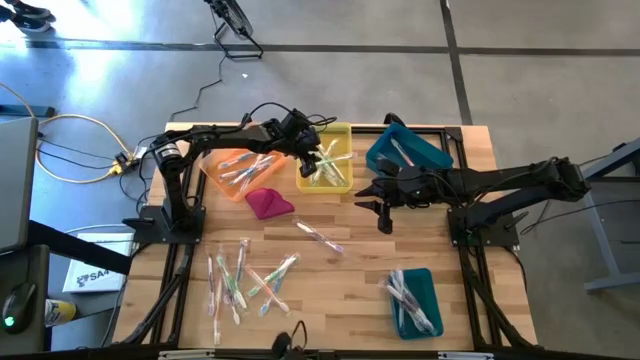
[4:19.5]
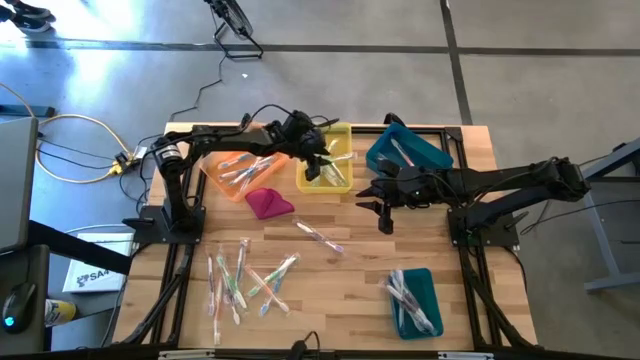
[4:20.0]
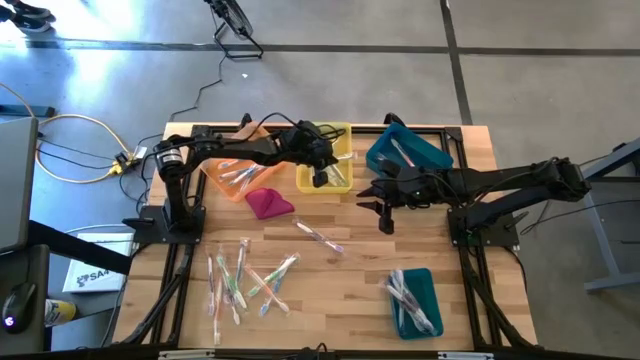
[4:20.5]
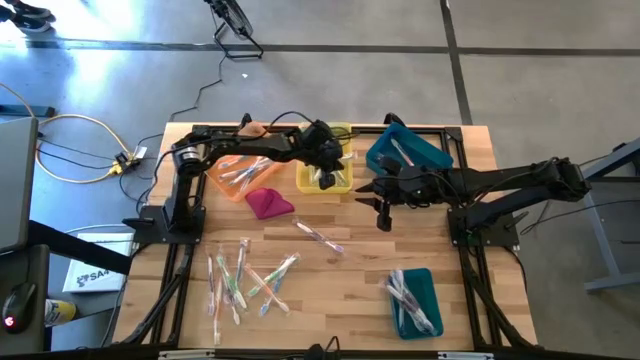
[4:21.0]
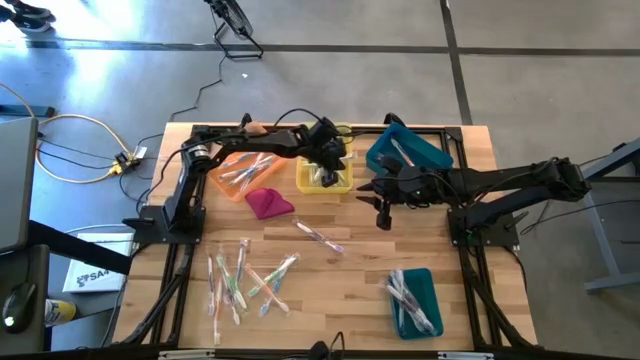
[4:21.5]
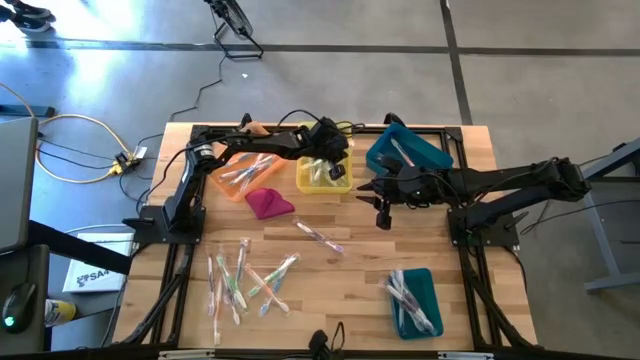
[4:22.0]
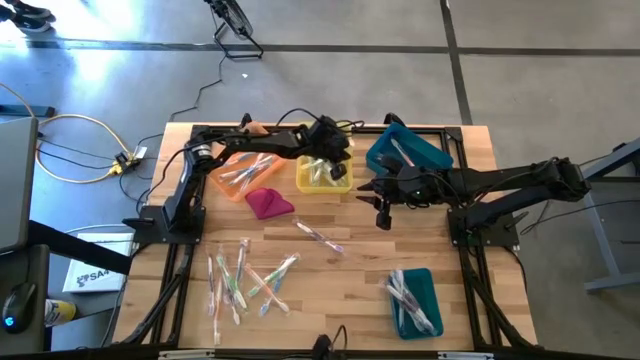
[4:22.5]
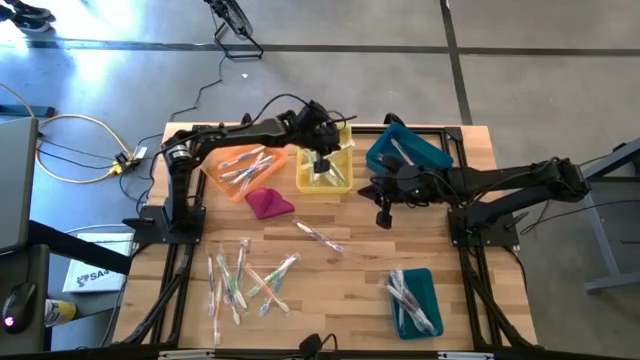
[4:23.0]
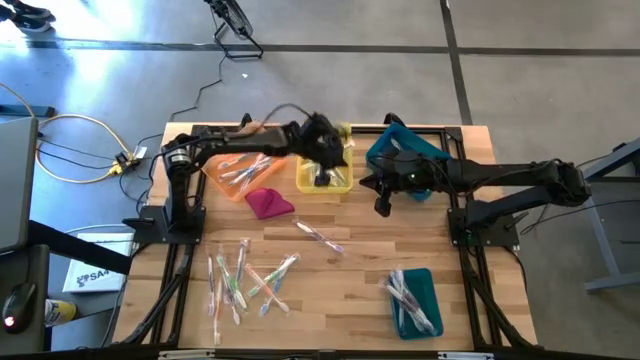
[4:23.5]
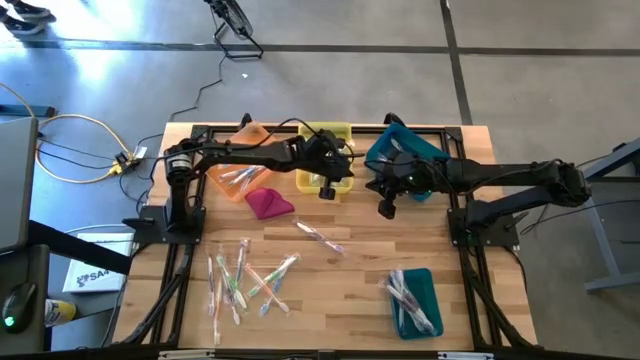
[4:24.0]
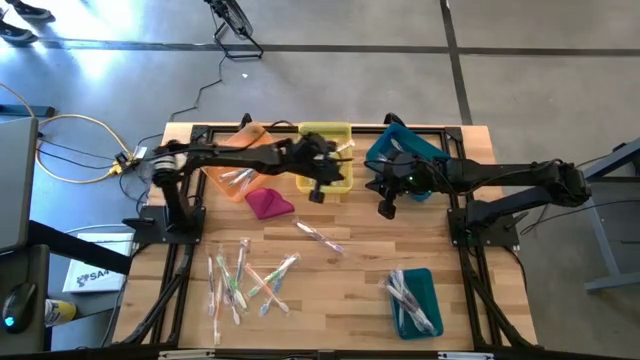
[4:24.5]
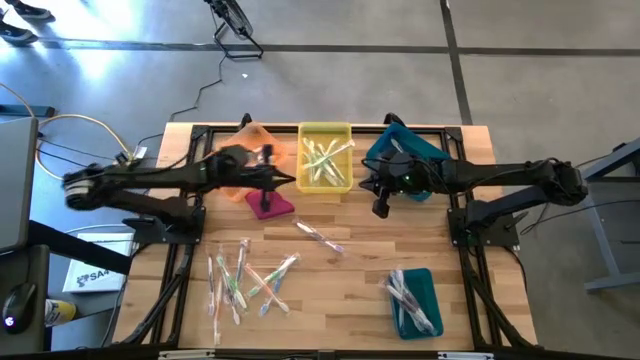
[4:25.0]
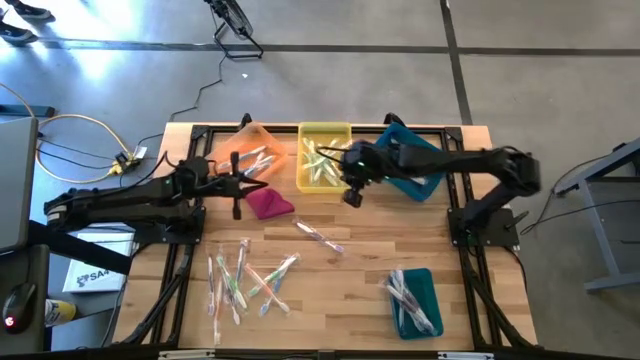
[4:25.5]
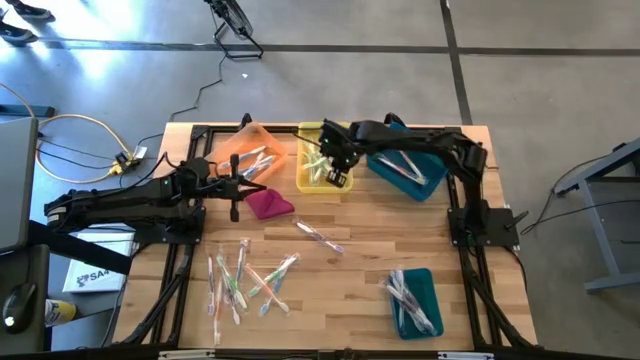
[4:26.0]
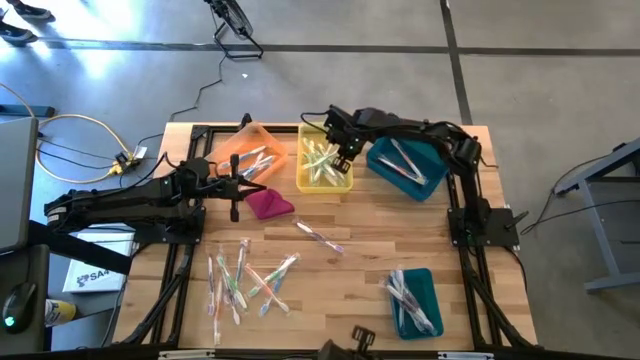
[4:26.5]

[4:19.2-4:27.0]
Task: Pick & Place Toothbrushes
Adjust the green toothbrush in the yellow bin

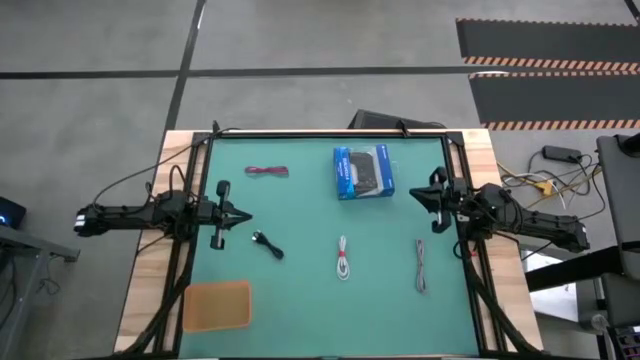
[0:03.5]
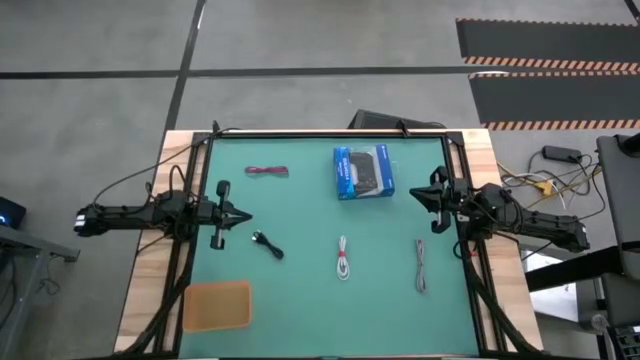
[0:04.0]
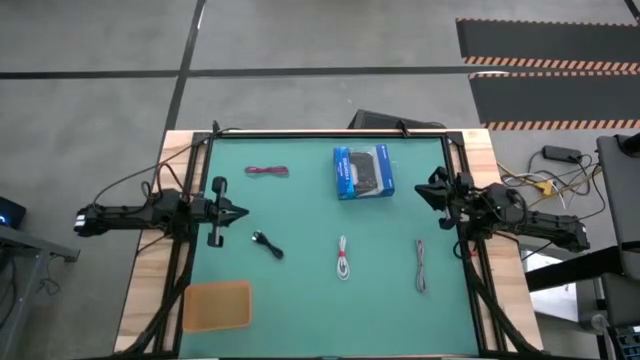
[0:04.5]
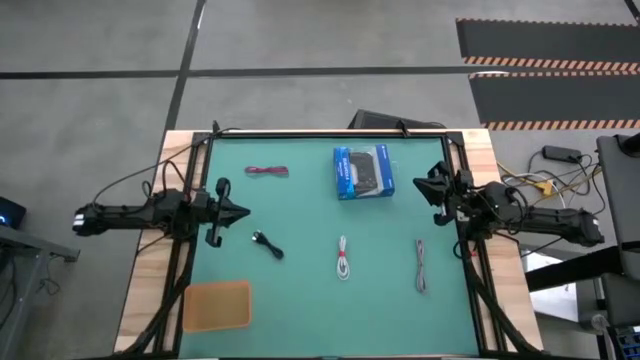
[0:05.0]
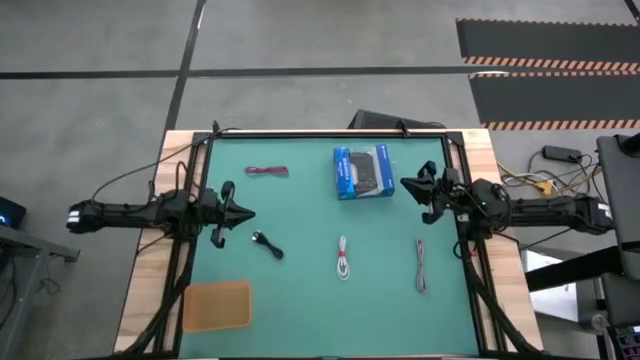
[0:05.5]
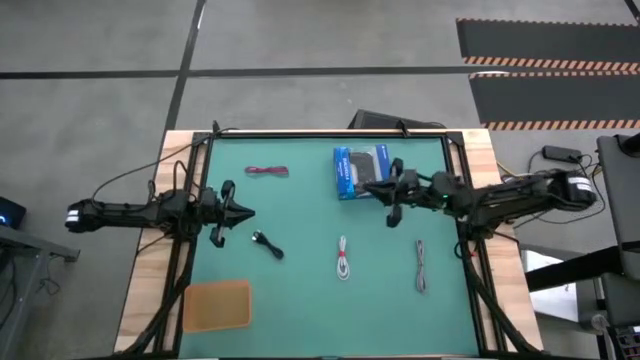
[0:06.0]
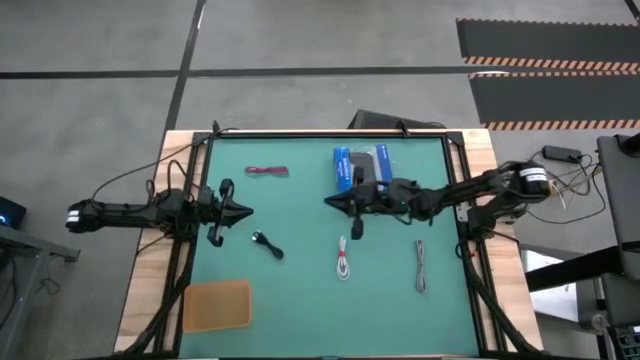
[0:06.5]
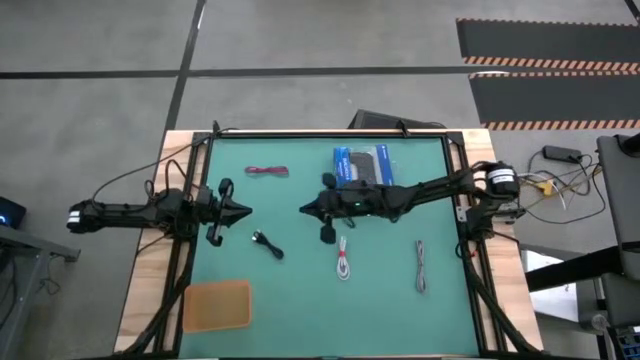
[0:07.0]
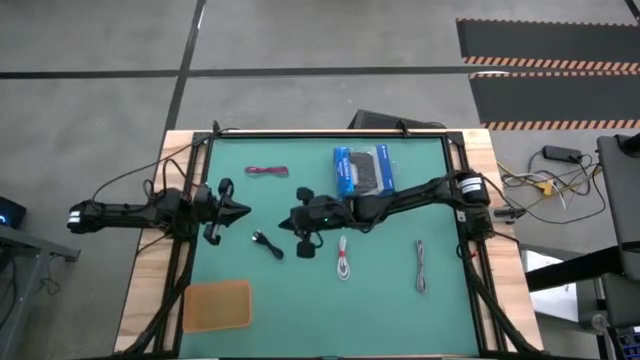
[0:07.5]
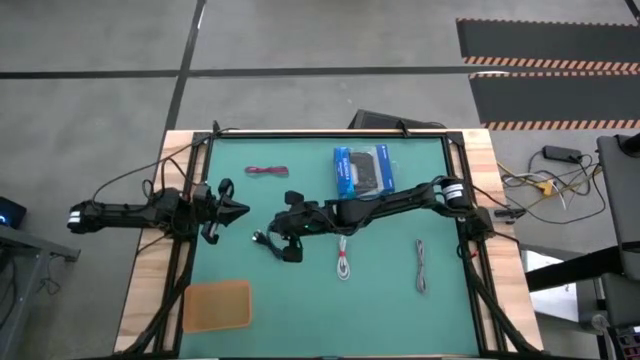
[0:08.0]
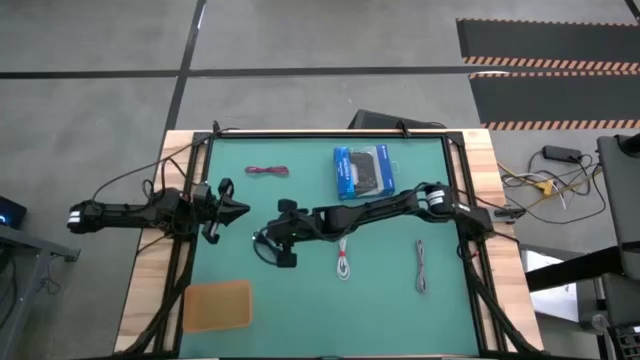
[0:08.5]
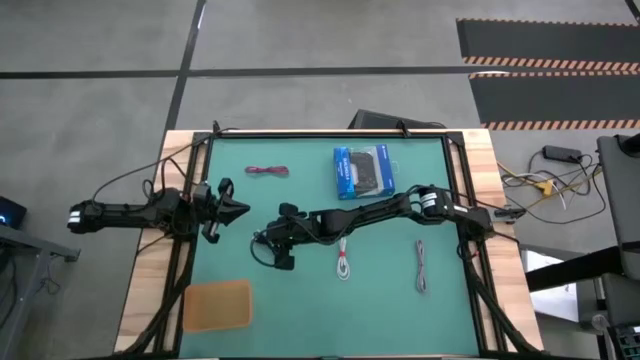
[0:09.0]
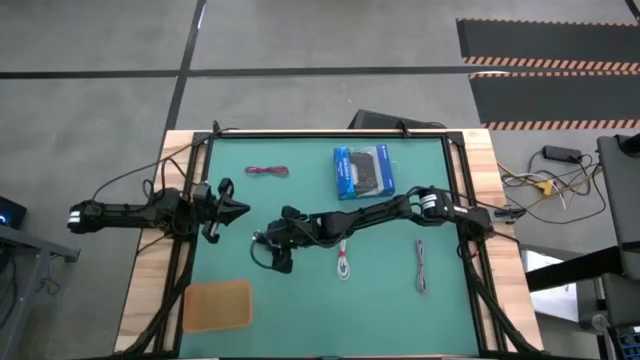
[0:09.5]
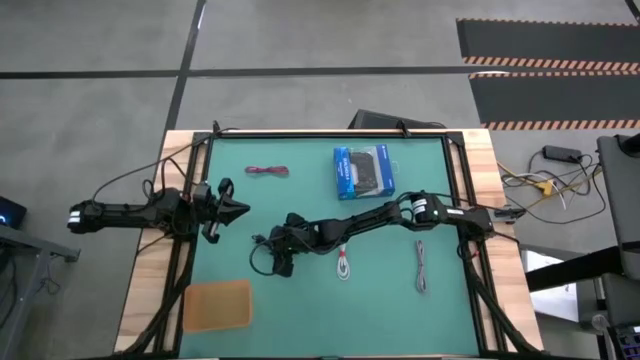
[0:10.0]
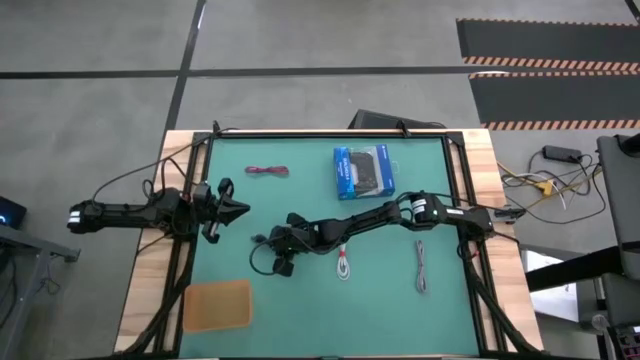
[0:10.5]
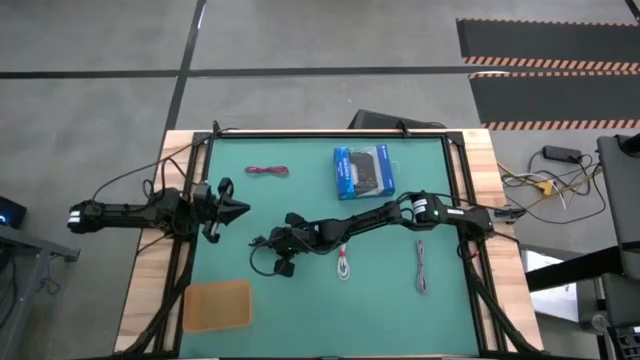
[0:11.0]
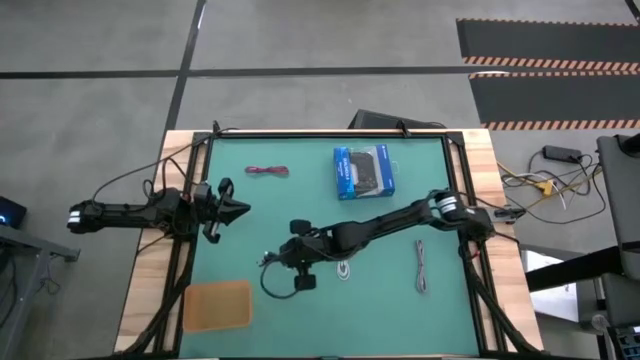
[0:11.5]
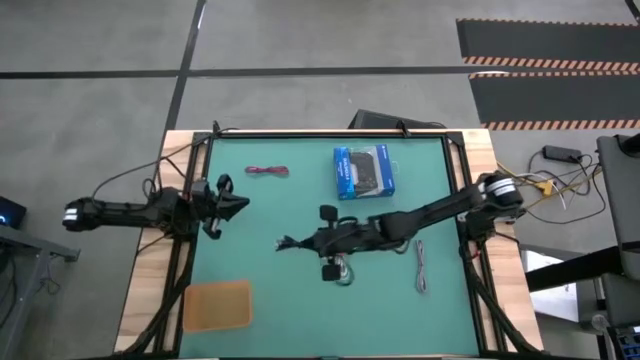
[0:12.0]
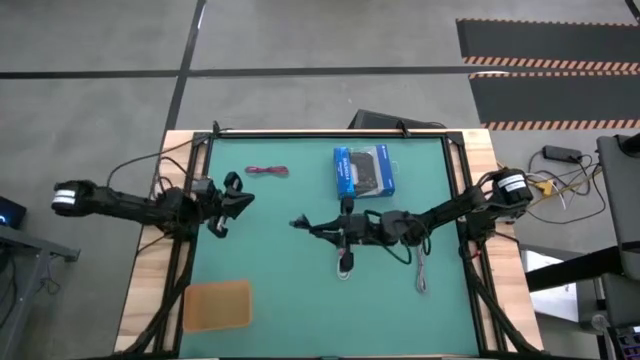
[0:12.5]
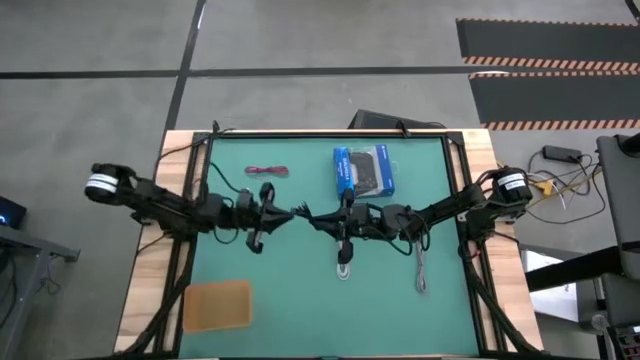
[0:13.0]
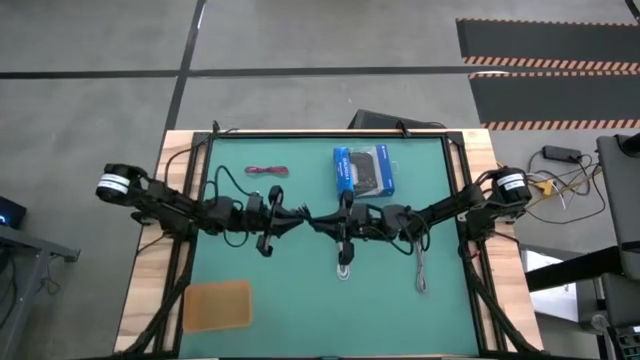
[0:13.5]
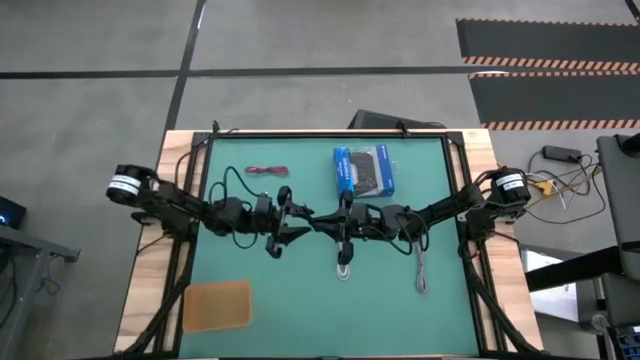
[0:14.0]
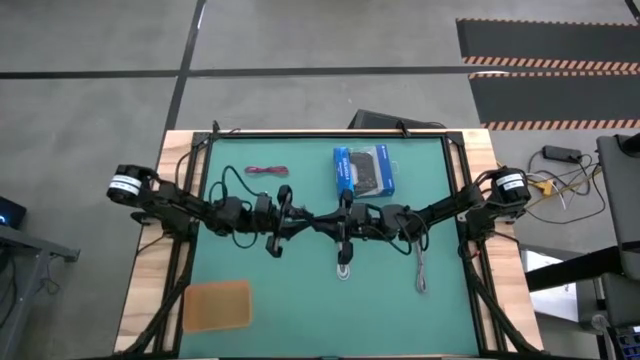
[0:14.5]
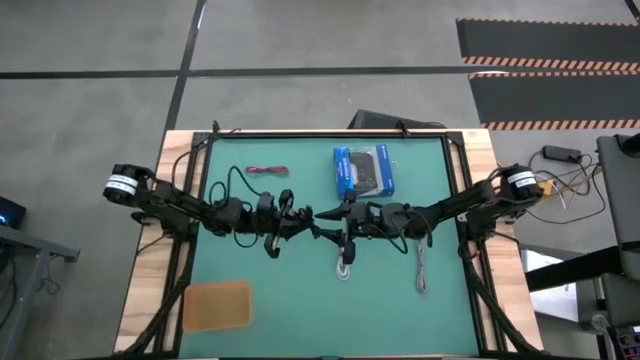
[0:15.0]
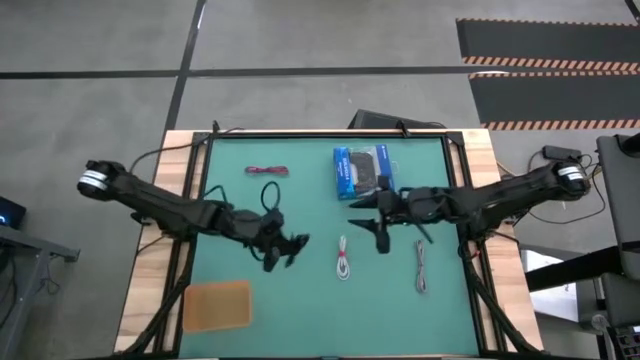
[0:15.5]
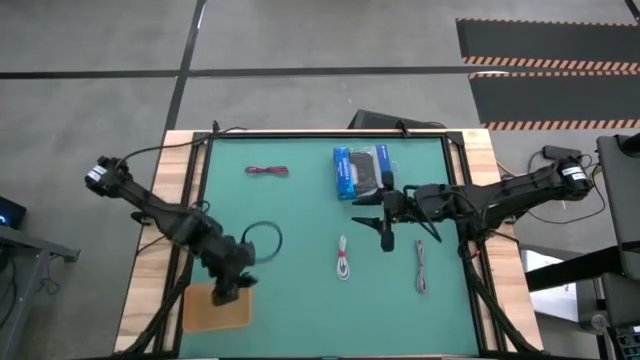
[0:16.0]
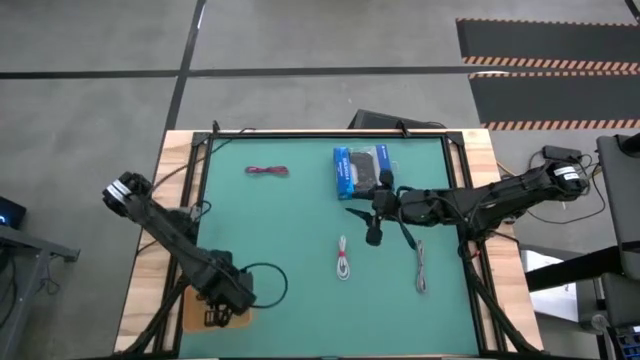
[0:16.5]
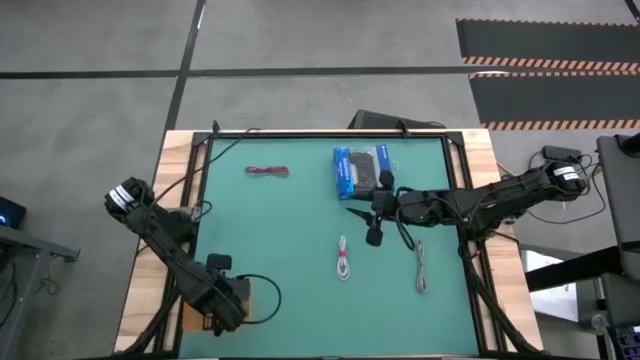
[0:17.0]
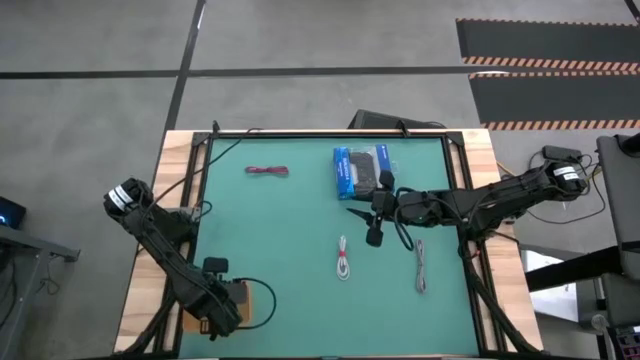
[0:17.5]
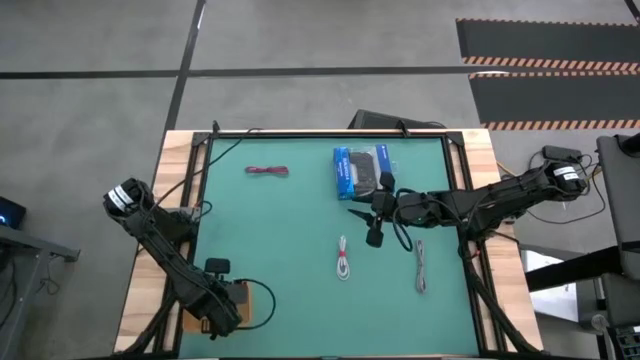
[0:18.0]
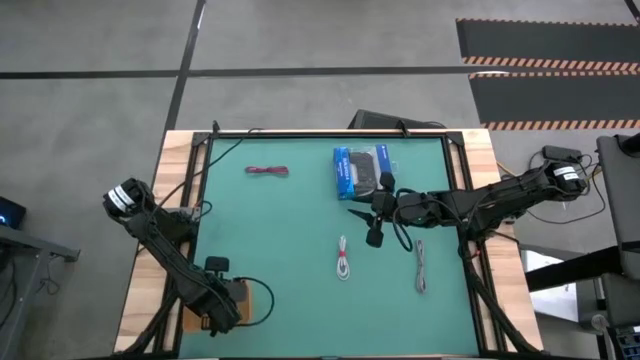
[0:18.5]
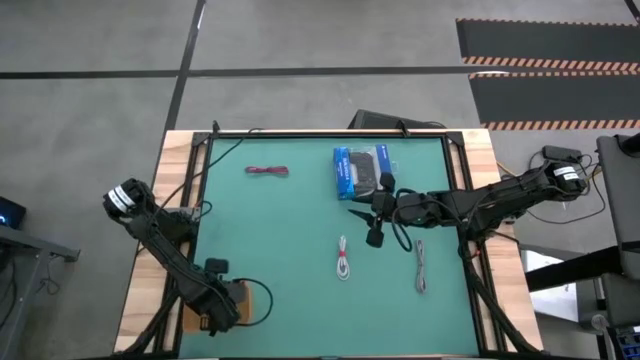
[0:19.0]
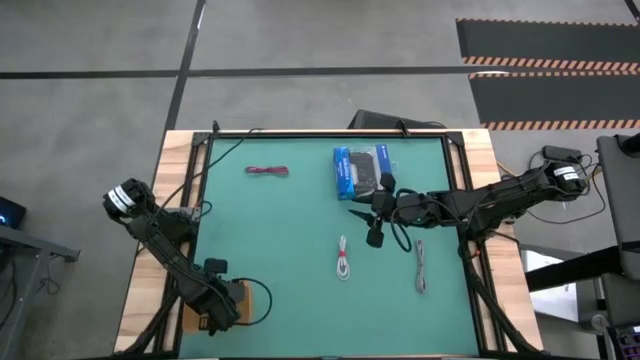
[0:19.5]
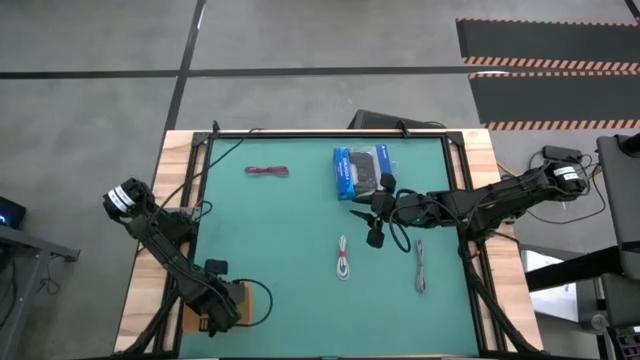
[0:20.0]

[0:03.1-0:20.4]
Task: Pick and place USB-C Cables
Put the black charger cable into the orange bin
